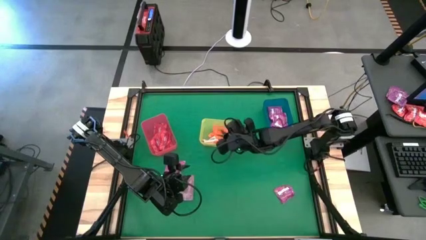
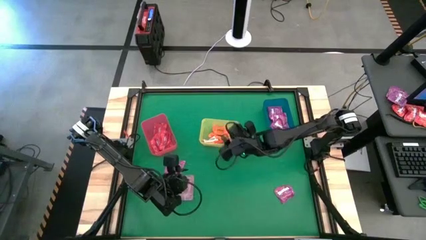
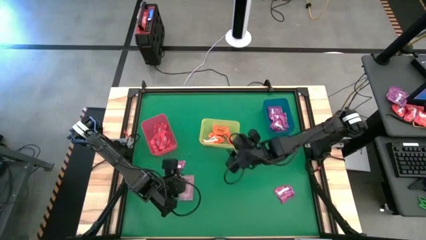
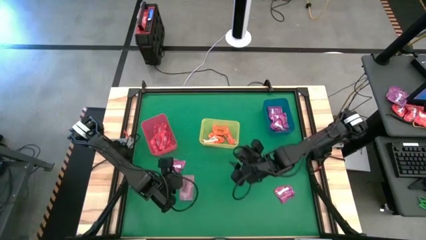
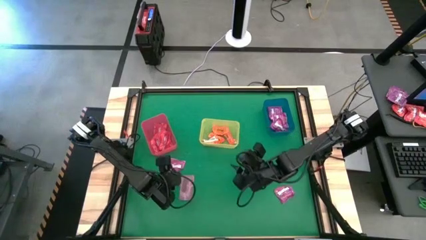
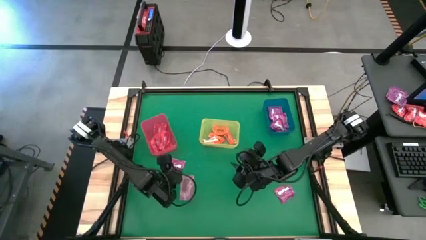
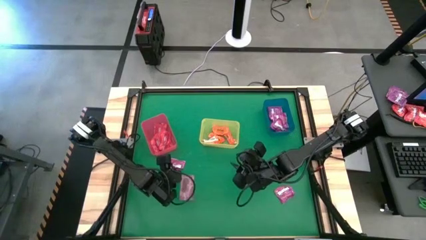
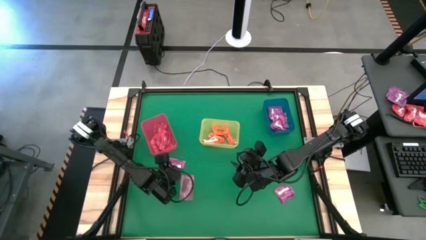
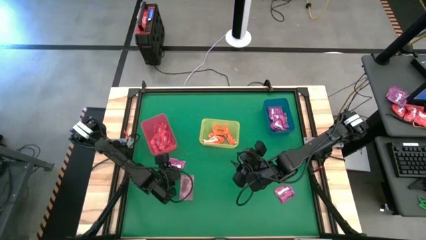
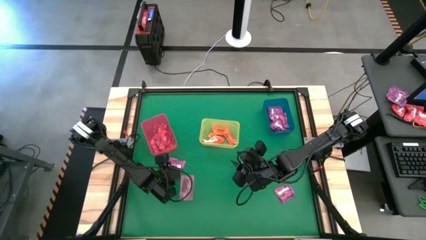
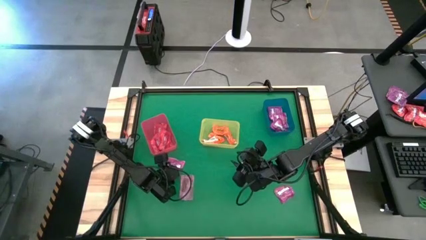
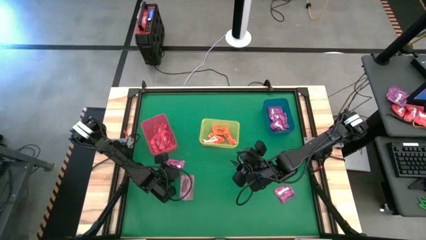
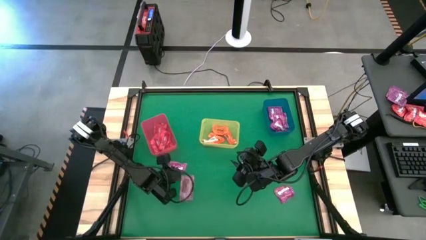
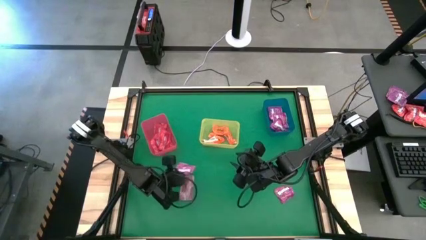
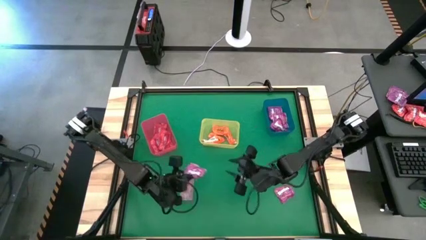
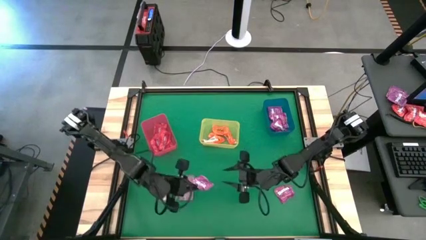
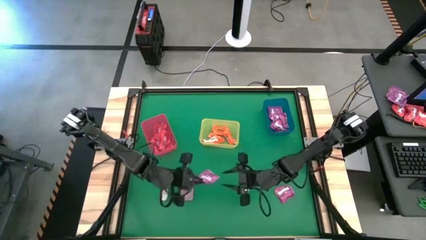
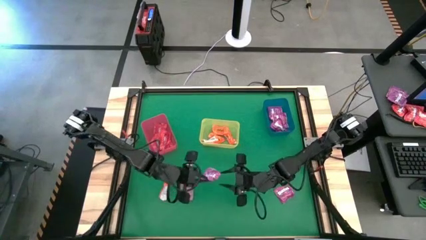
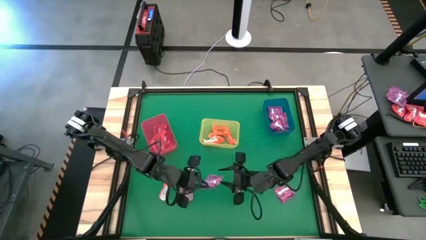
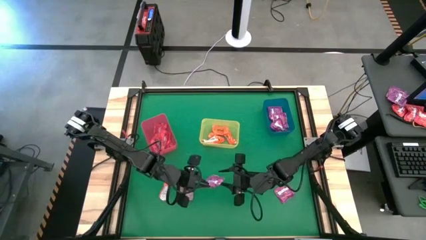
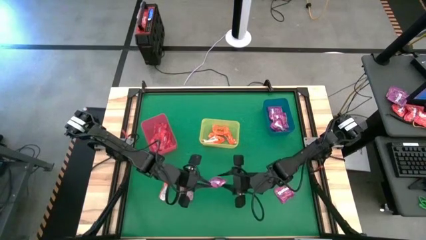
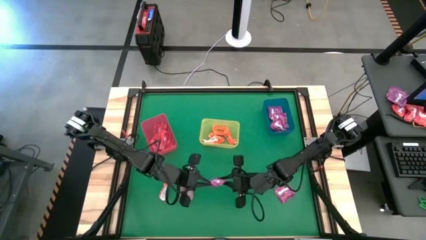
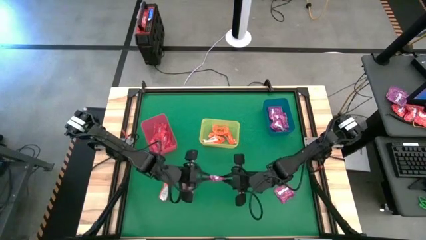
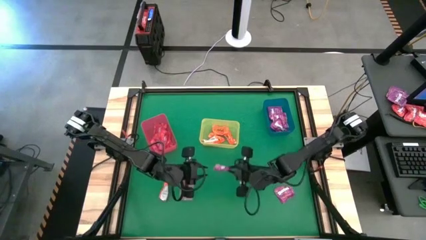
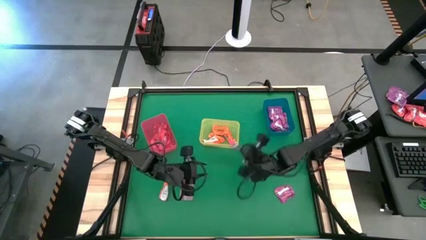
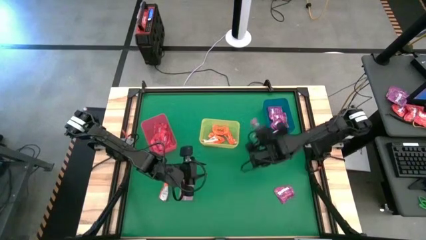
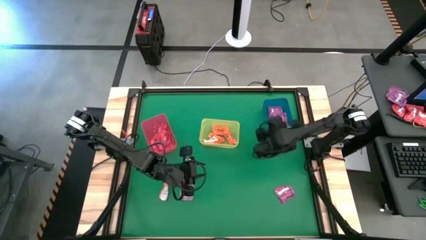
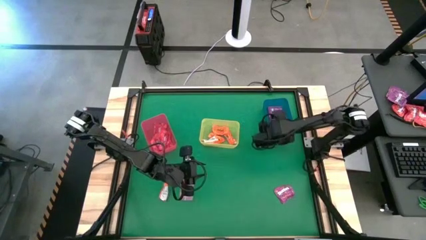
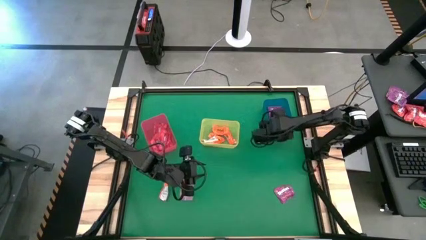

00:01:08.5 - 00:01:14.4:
Task: Sort candy by brand, put in halloween buckets
Put the purple candy into the blue bin

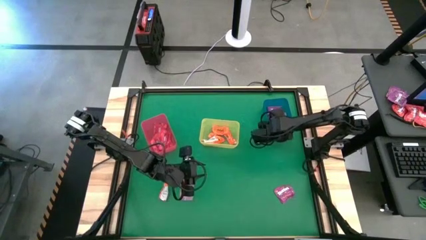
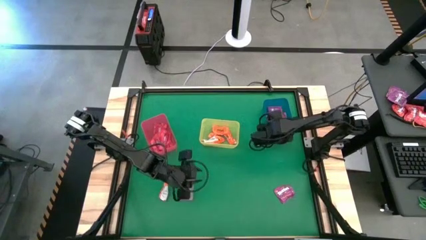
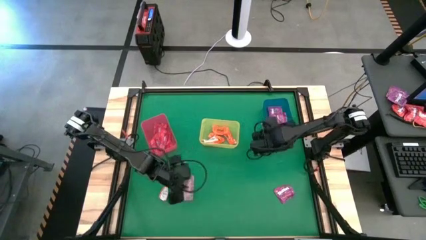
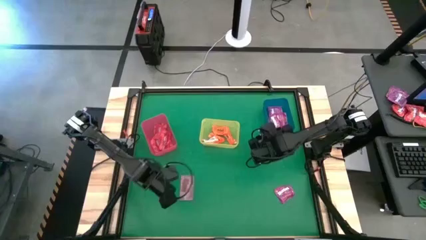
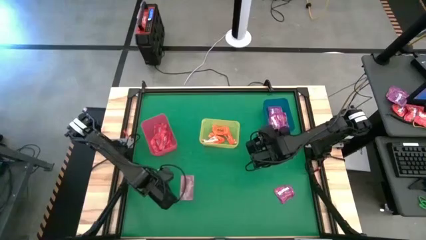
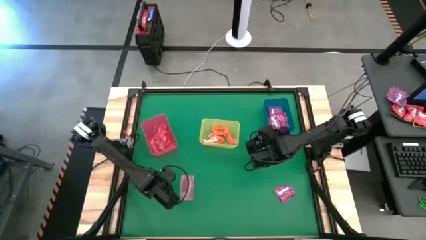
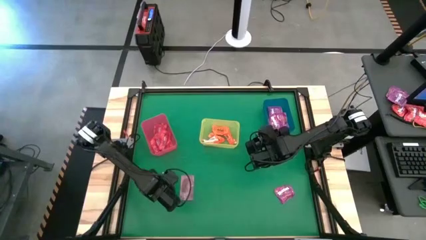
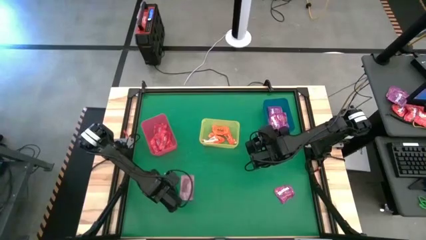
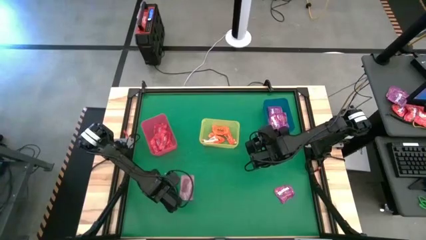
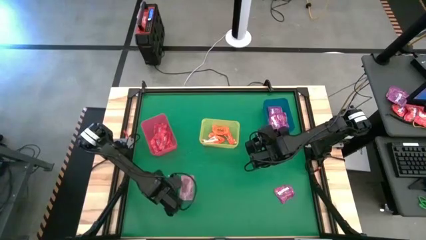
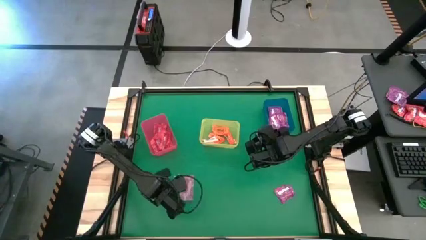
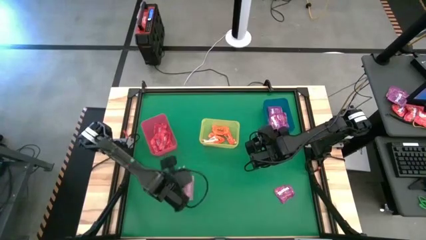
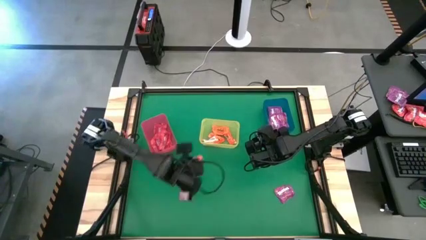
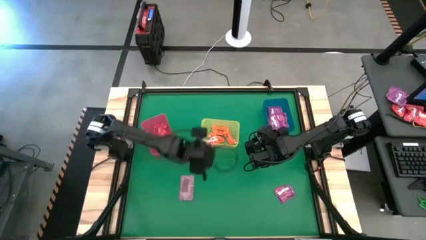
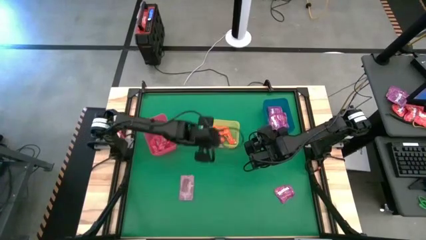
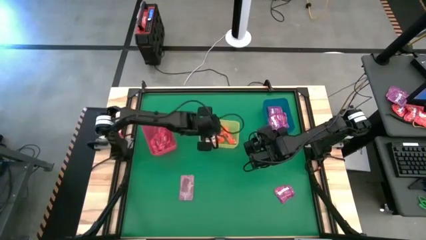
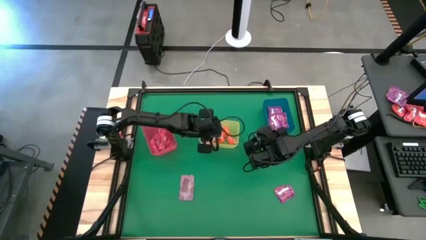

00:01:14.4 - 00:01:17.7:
Put the orange chocolate into the yellow bin

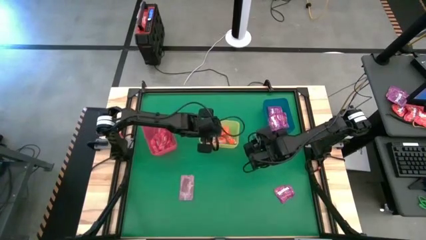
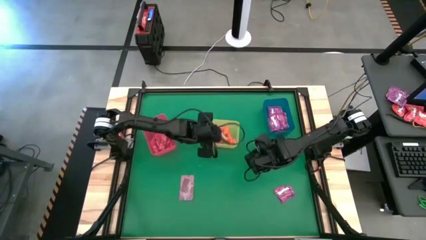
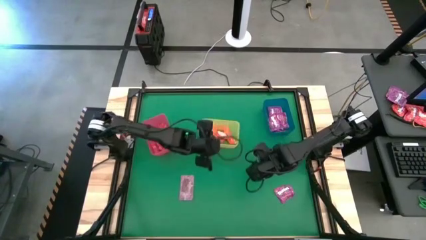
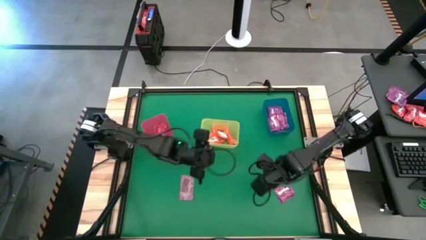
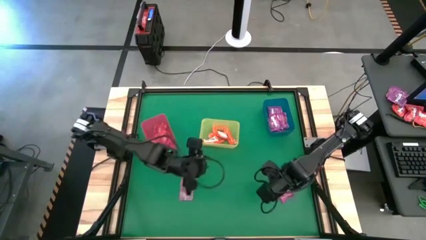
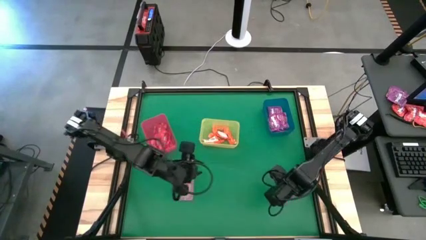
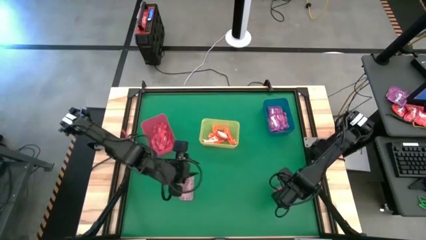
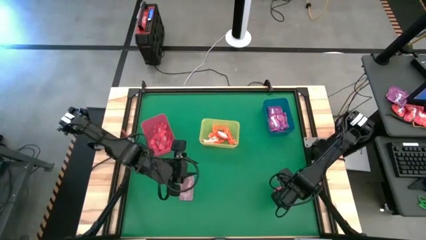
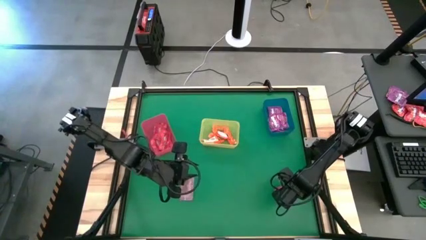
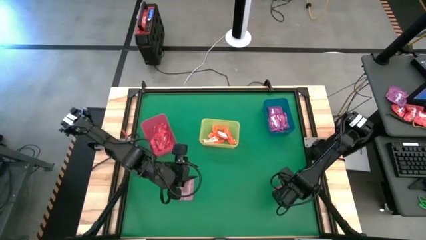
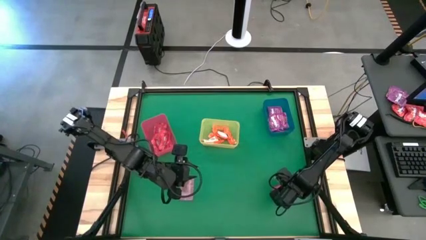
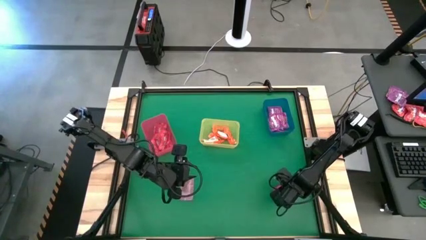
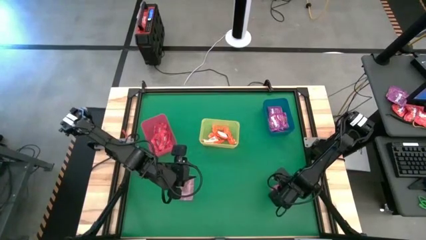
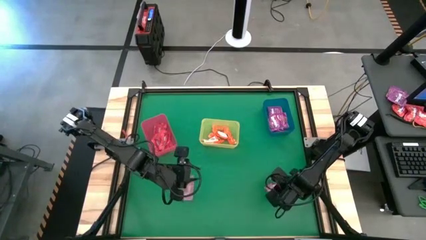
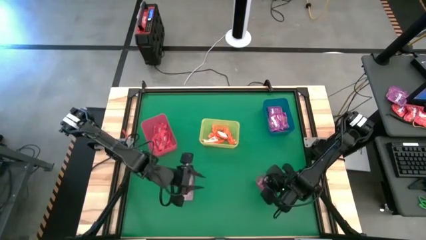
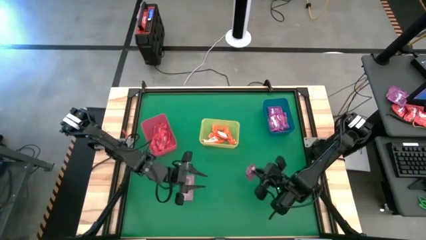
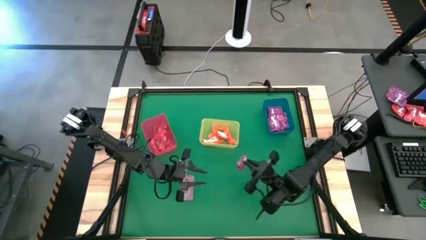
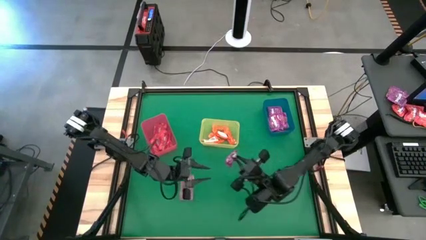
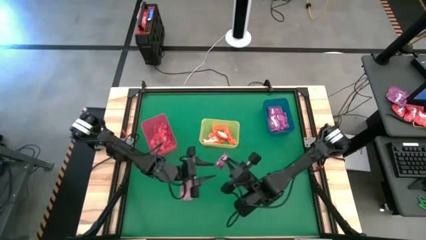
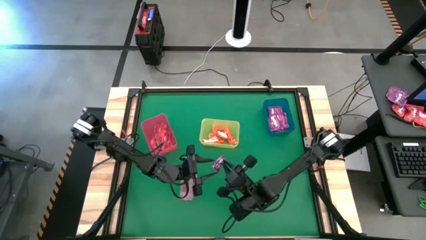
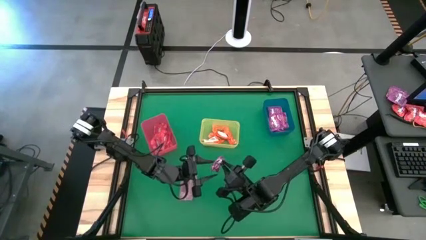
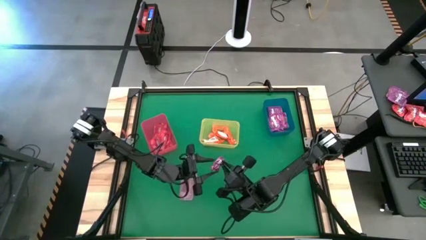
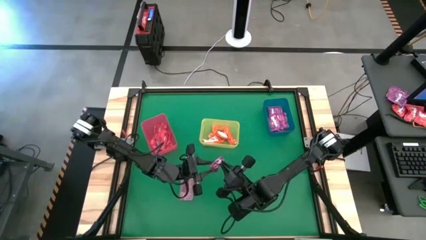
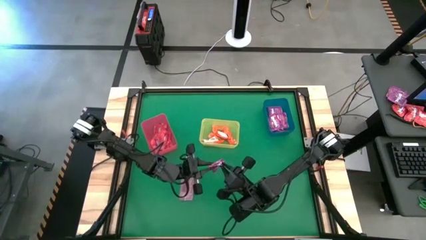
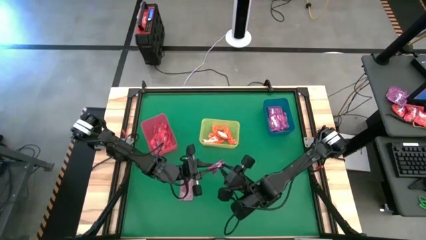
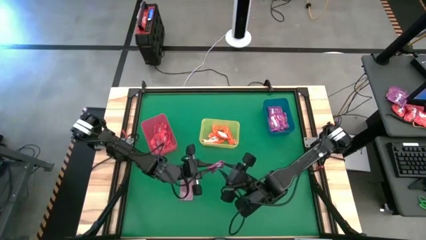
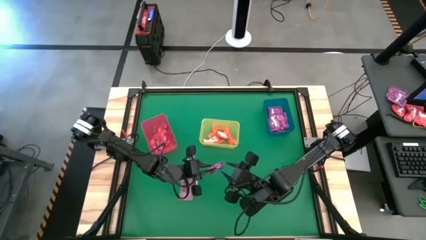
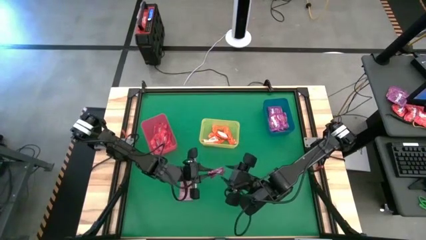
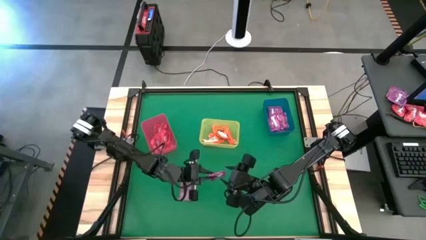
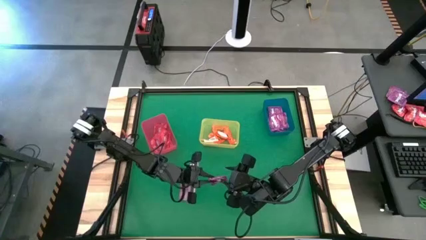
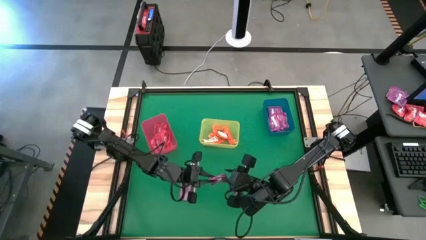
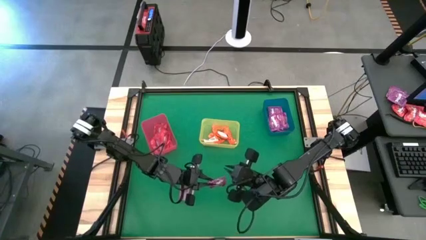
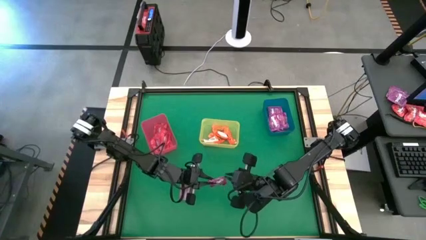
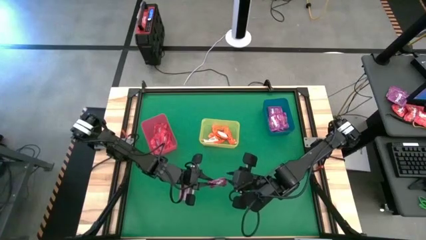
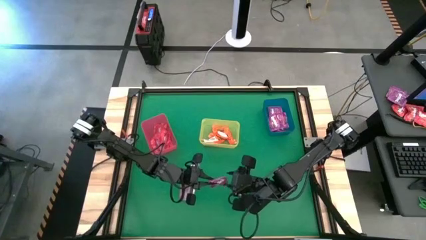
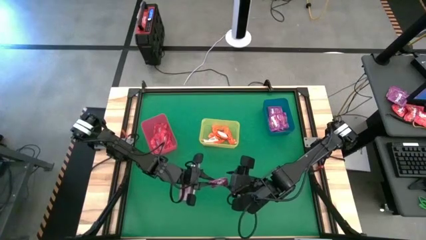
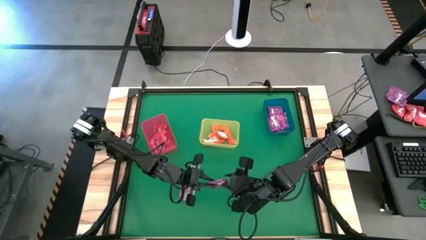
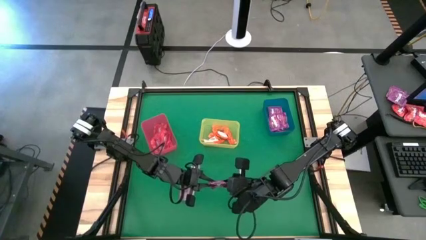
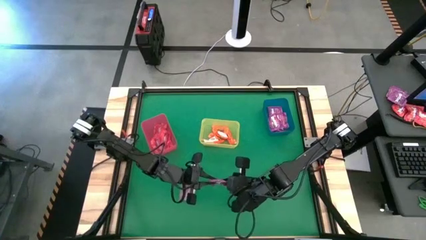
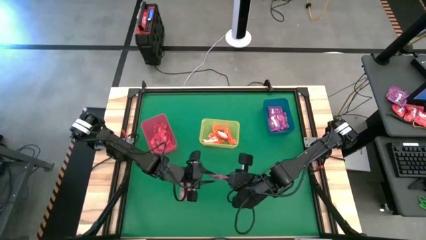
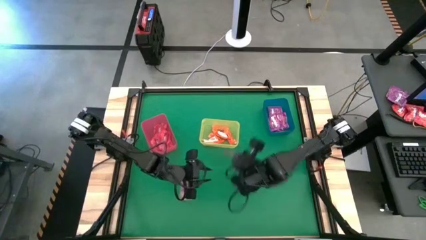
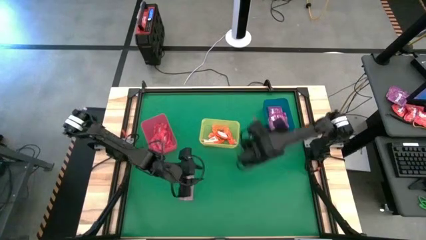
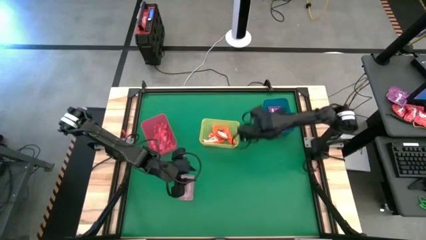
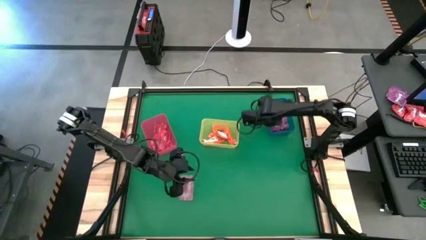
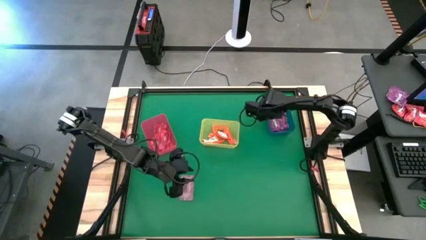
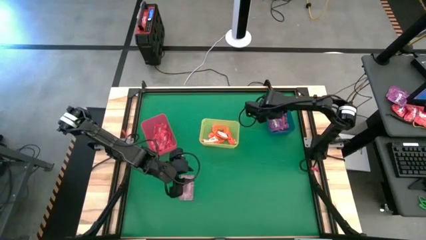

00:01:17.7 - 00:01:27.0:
Put the purple candy into the blue bin
